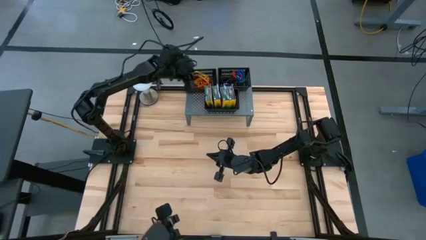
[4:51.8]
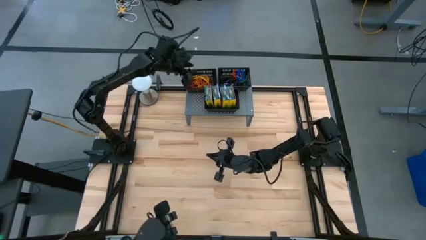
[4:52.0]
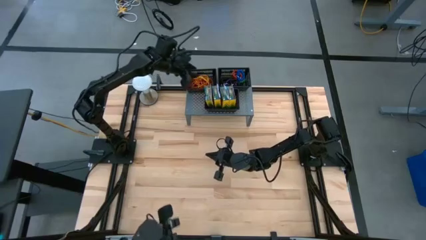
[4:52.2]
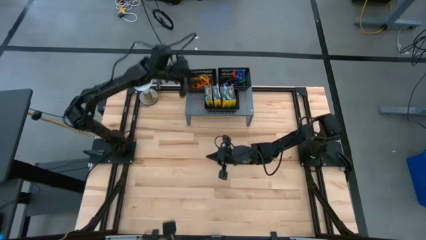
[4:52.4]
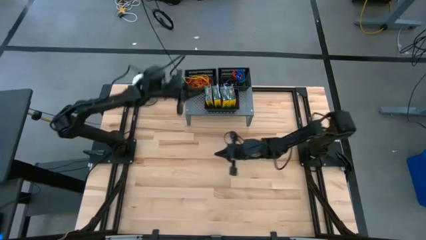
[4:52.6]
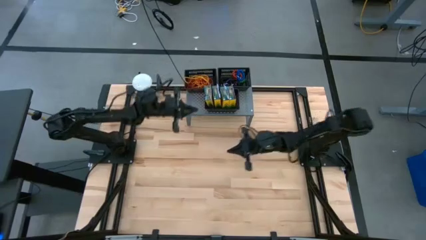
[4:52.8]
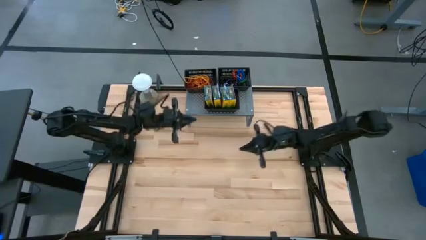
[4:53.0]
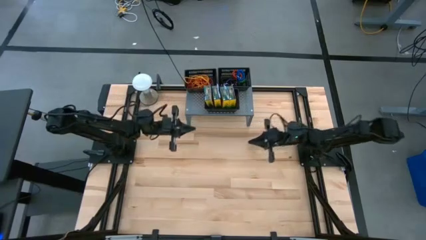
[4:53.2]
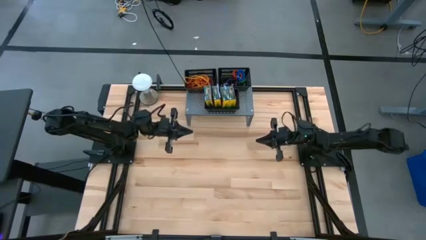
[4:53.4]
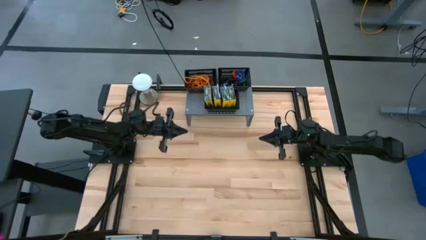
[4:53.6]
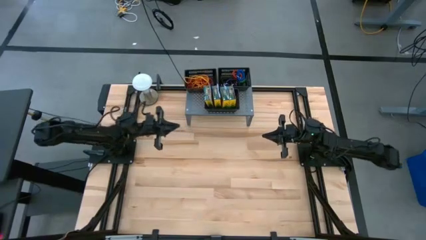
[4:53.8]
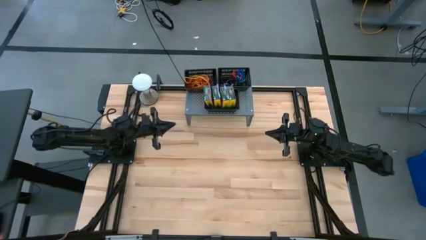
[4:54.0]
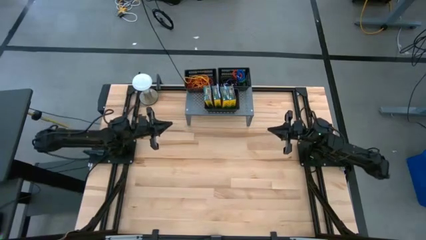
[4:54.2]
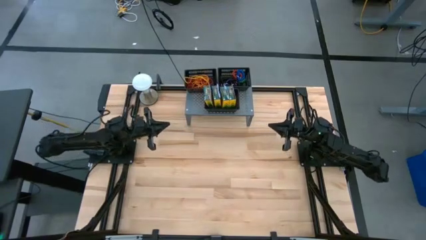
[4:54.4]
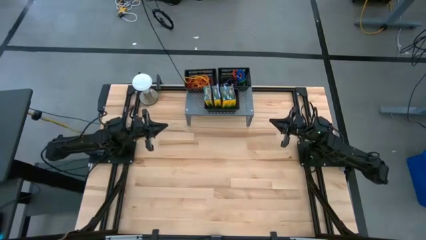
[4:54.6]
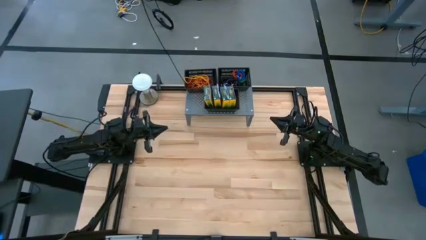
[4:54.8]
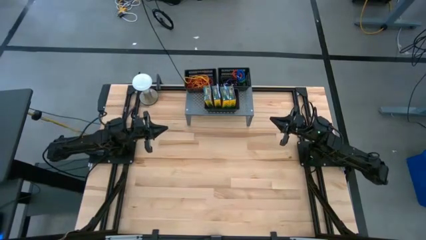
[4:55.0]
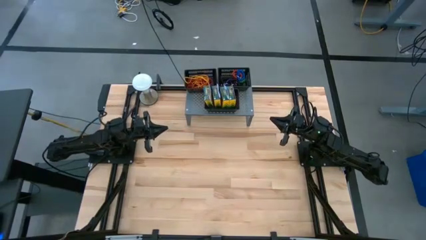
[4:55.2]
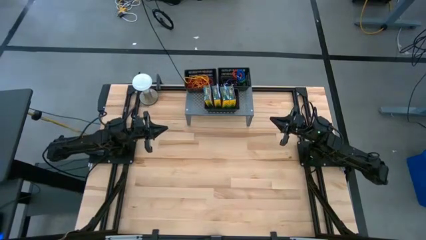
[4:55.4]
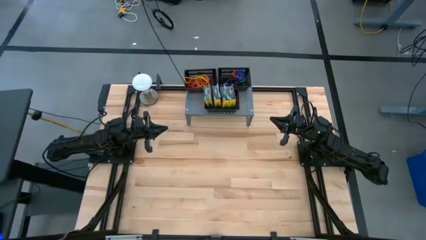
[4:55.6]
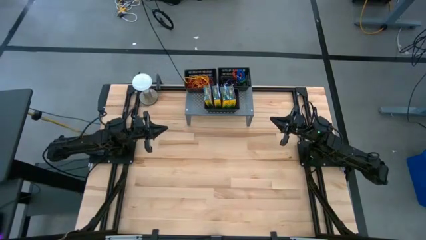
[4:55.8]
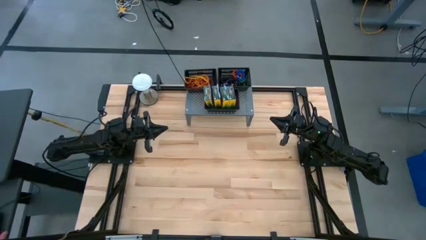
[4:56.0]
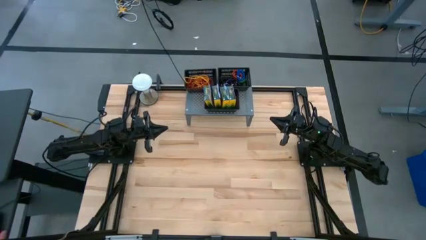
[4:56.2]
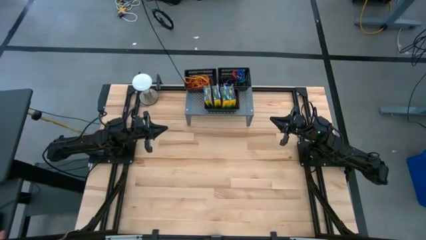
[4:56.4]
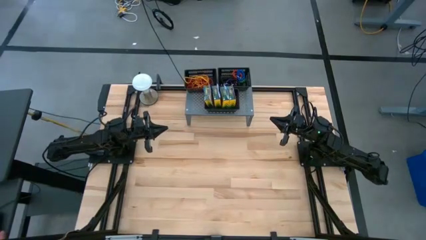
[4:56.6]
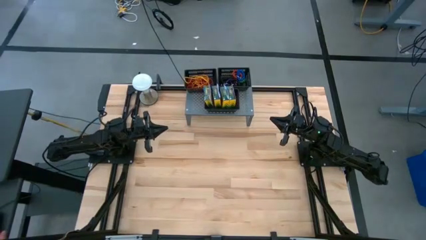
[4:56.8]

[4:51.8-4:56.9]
Task: Pick & Place Office Desk Supplies
Return to Home Position

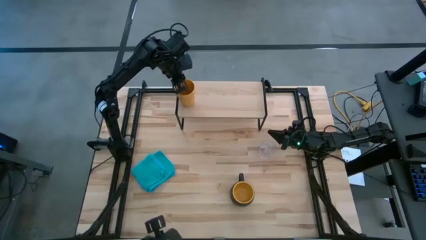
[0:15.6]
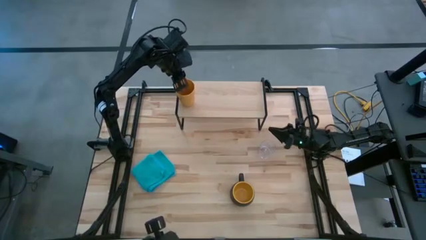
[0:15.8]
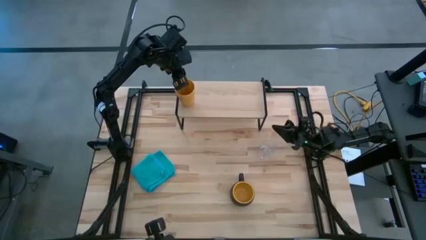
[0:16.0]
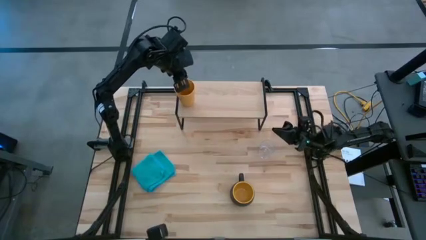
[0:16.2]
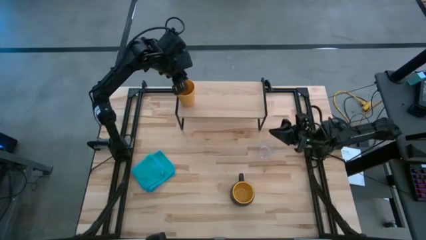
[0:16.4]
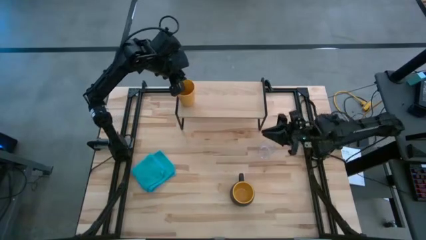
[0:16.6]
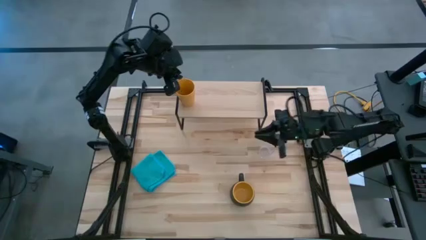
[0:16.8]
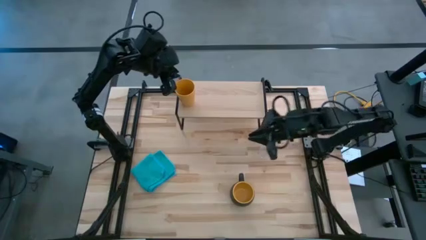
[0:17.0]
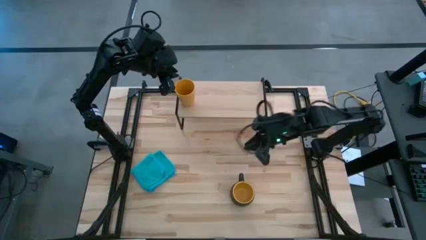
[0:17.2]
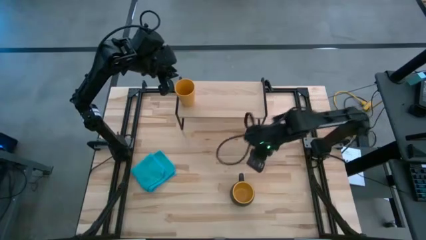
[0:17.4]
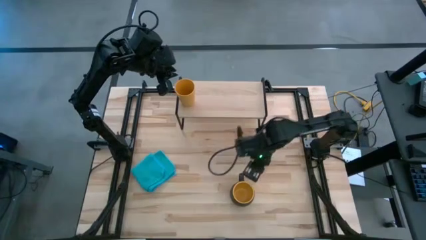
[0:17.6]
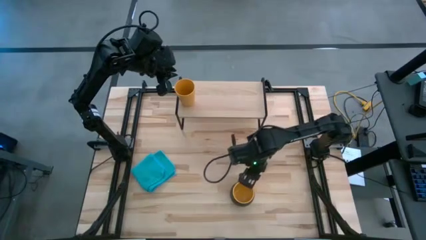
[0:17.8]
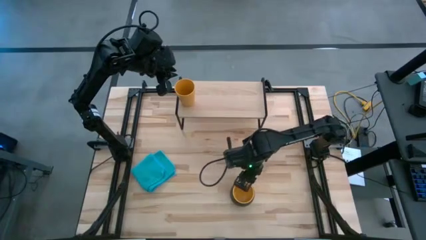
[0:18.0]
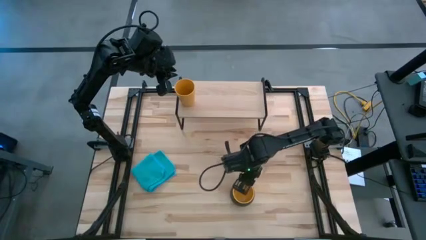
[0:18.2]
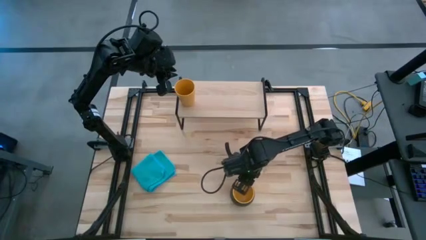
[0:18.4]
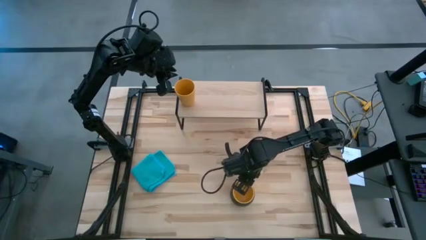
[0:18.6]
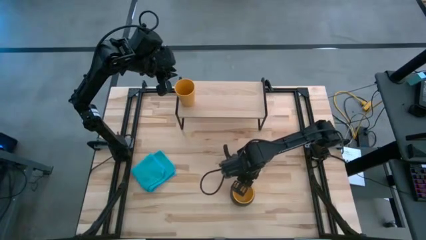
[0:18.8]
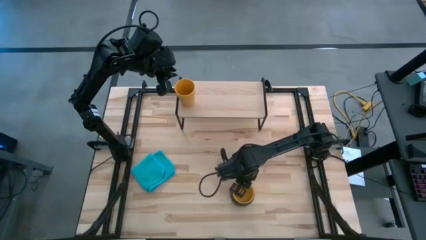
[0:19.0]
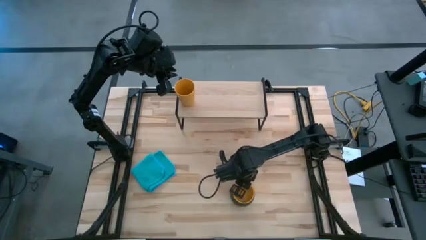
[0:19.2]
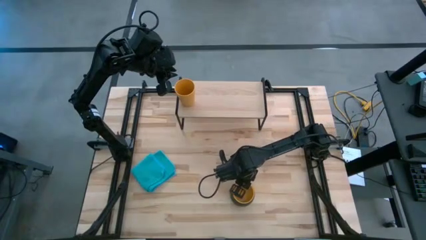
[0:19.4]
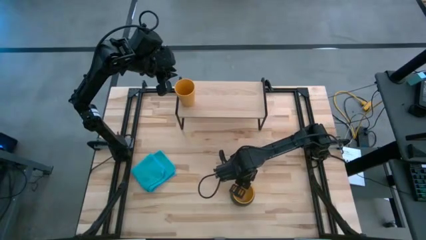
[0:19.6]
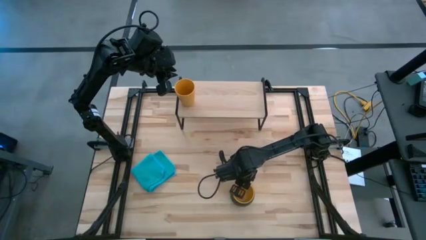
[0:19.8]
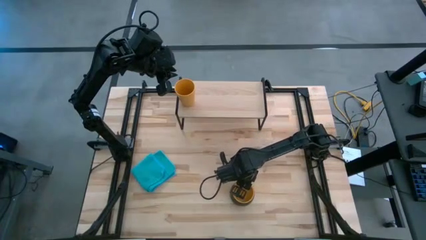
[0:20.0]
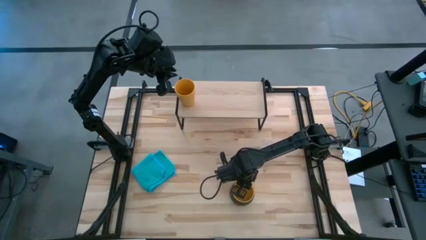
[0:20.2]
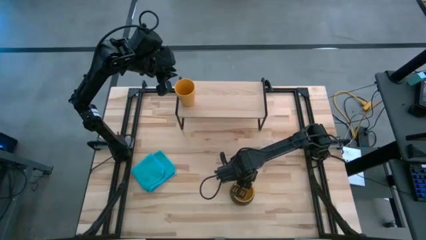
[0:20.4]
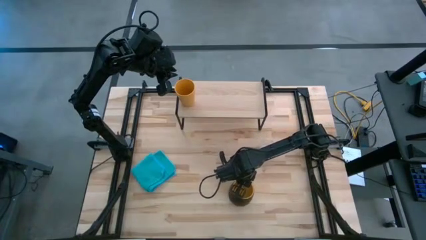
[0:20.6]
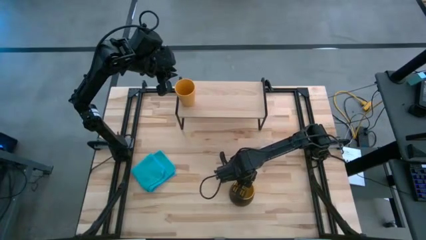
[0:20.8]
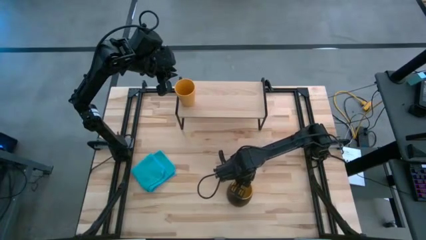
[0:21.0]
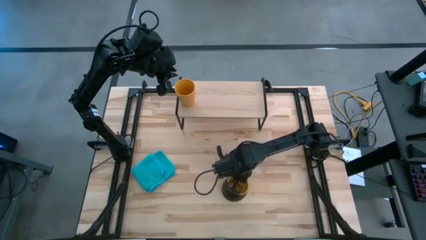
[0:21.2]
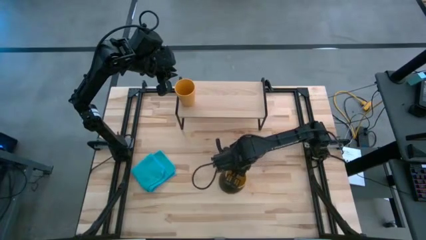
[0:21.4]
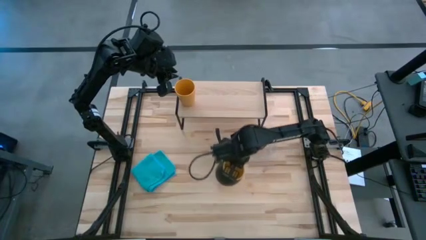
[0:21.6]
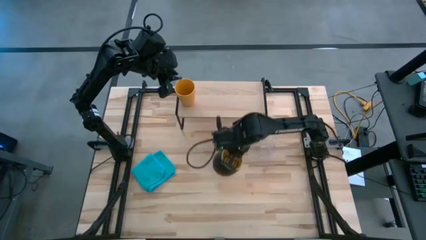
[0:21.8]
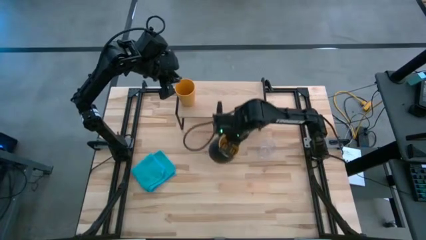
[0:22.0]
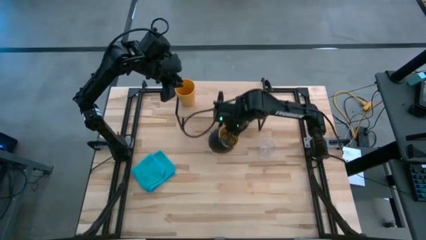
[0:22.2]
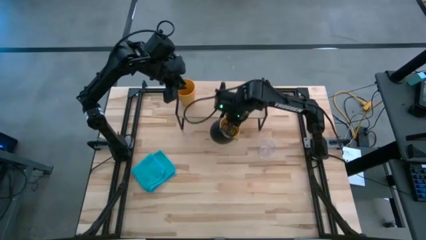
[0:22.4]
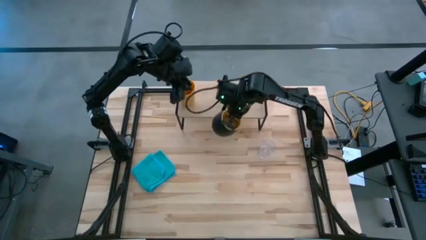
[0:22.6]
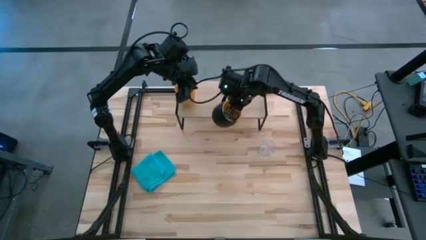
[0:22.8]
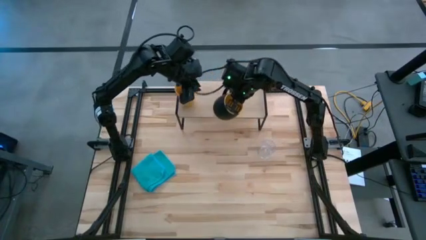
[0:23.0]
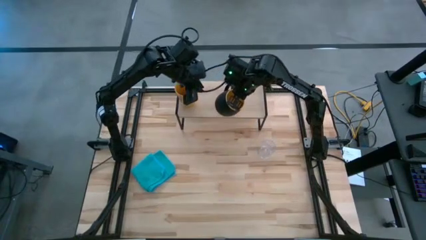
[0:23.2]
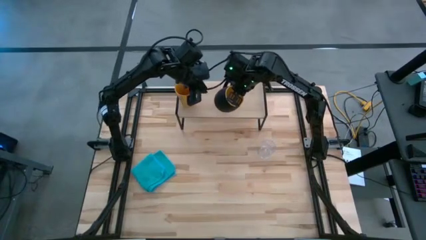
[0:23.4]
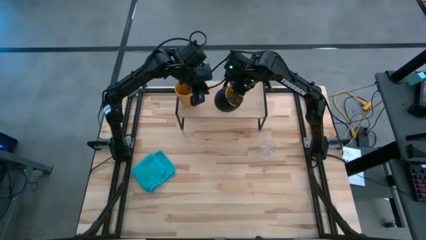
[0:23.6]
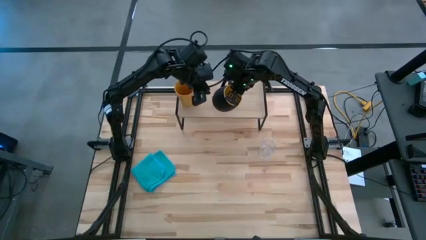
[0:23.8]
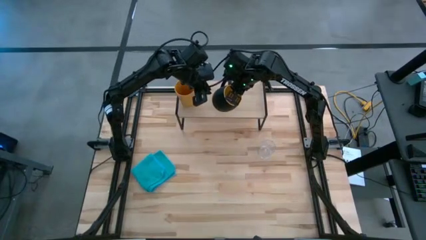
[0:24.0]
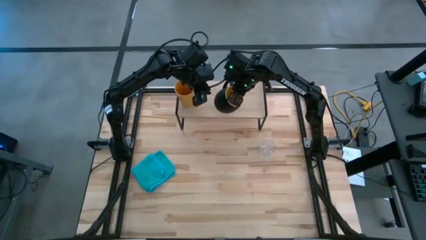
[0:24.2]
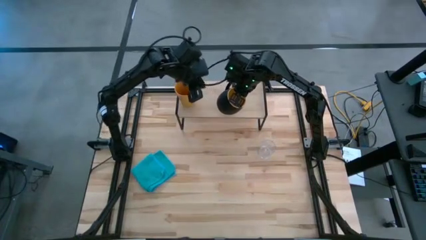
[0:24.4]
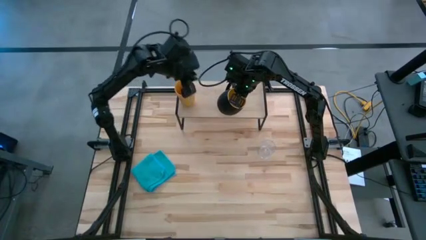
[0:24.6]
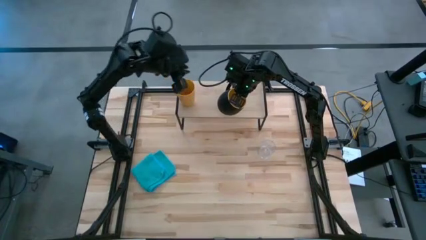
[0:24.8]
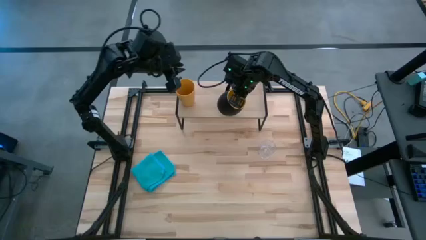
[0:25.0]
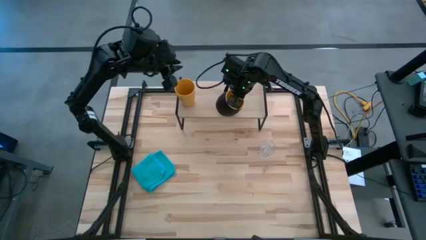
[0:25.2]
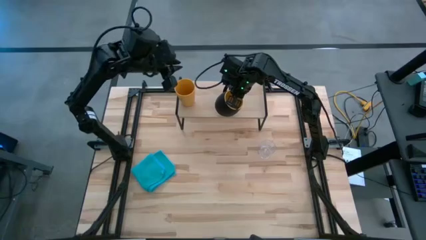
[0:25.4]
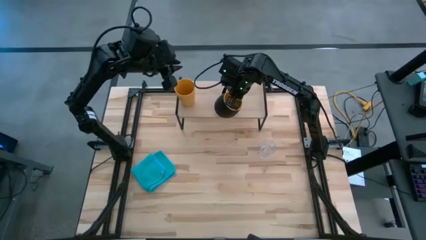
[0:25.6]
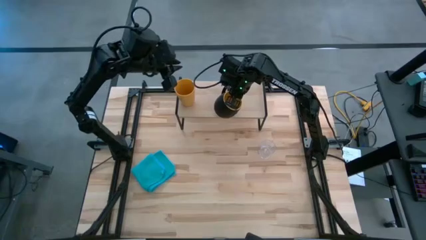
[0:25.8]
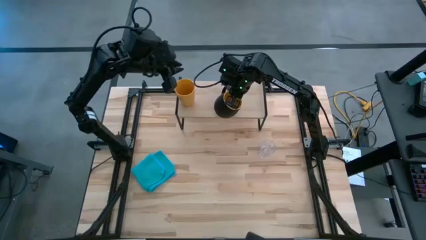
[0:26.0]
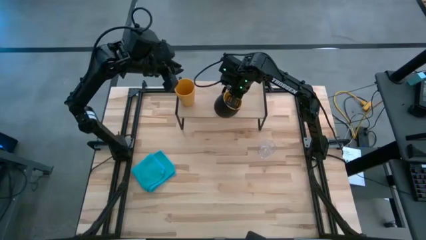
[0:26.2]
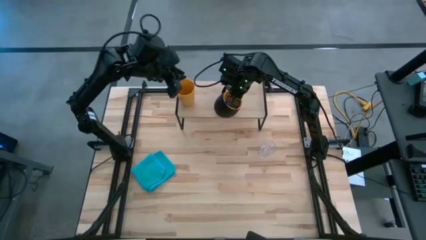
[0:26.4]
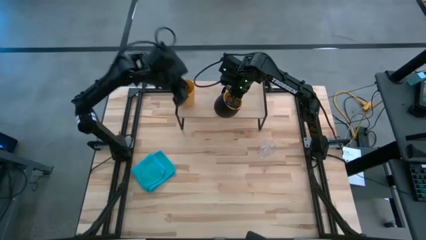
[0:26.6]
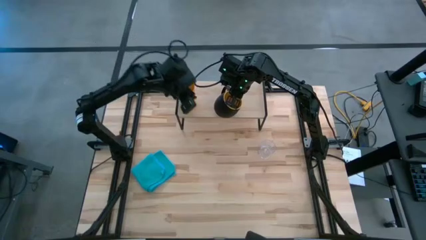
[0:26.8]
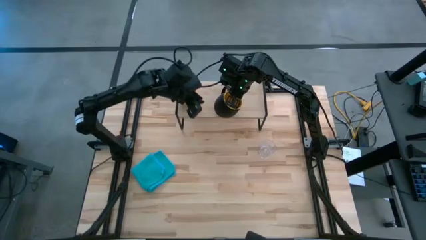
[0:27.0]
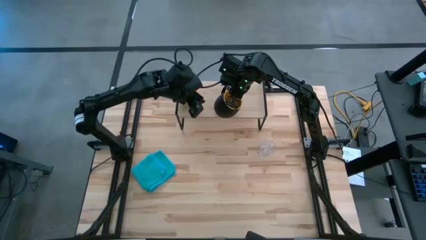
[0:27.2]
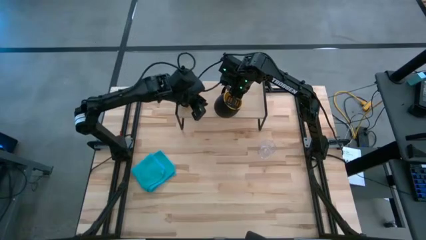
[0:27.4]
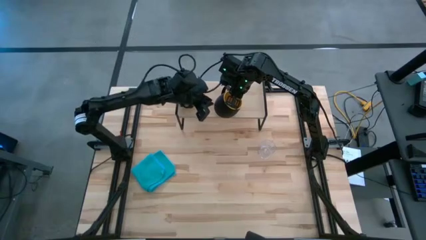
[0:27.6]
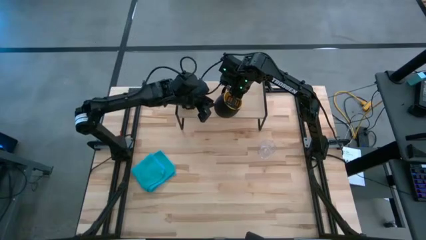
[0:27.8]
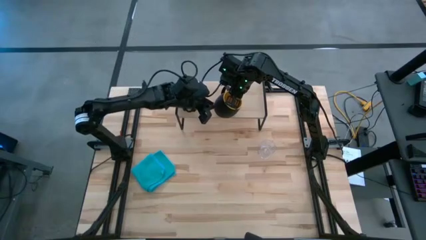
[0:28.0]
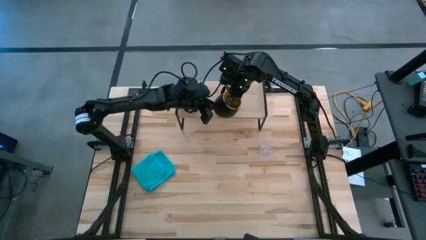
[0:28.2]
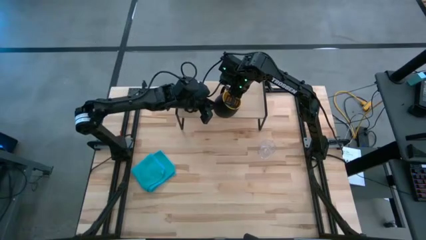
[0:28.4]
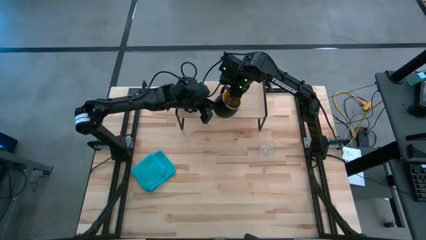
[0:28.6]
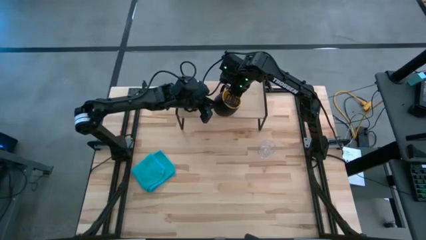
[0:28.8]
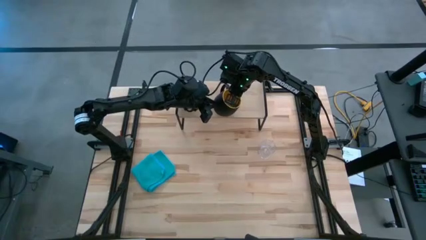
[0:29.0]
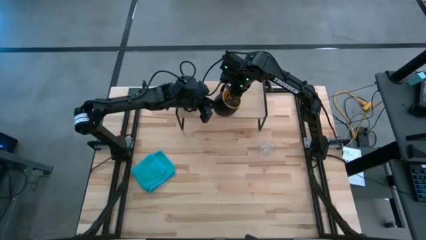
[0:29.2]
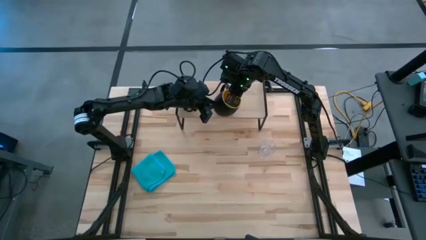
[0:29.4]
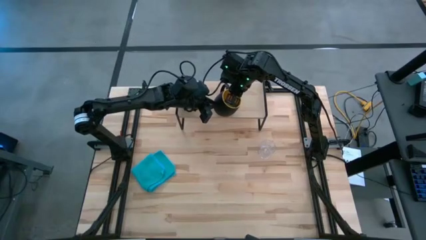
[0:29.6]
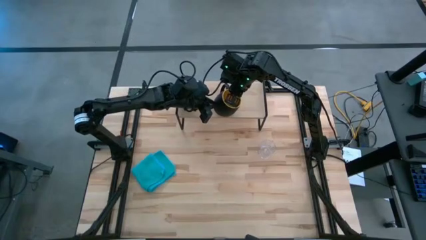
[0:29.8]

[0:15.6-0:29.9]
Task: Stack small to large cups/mugs on shelf
Put the black mug on the shelf
